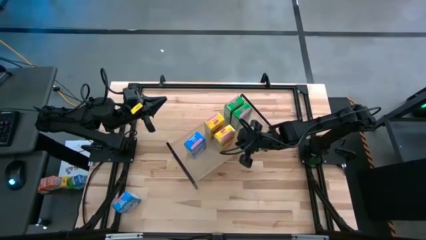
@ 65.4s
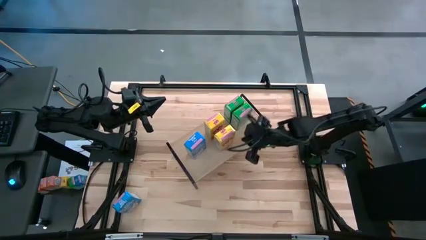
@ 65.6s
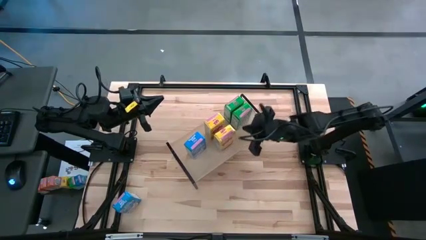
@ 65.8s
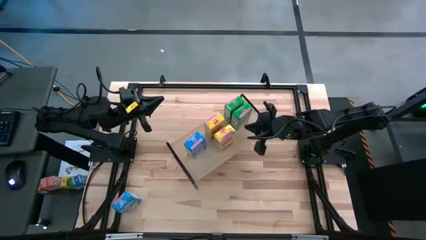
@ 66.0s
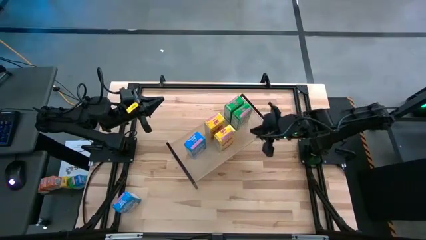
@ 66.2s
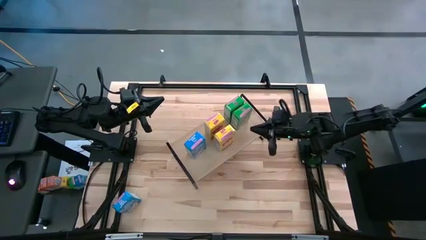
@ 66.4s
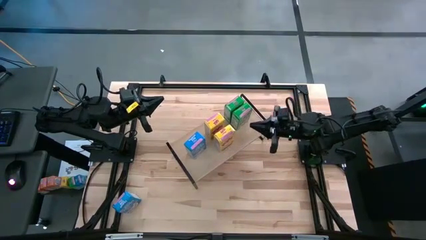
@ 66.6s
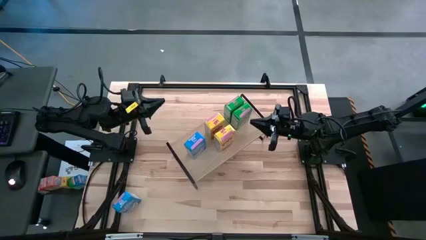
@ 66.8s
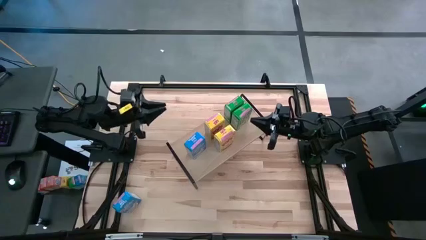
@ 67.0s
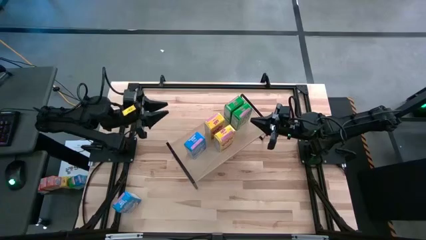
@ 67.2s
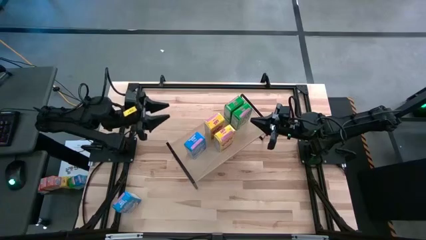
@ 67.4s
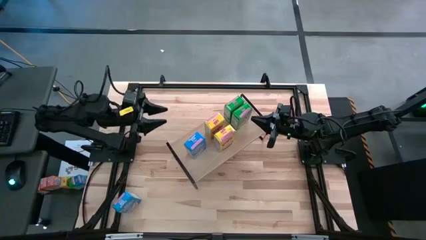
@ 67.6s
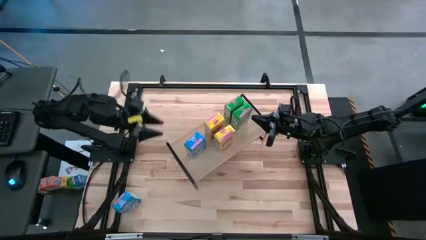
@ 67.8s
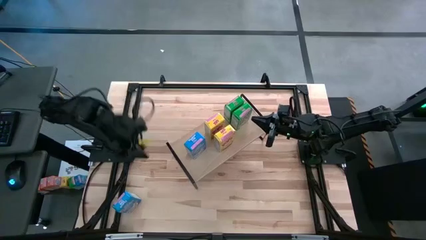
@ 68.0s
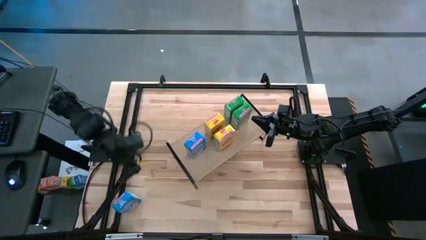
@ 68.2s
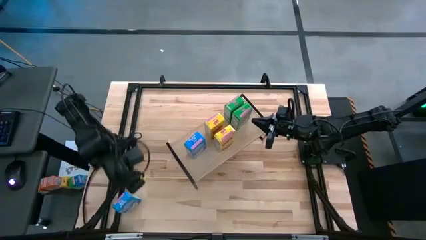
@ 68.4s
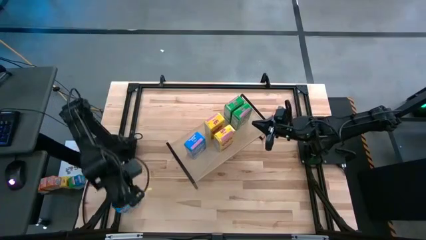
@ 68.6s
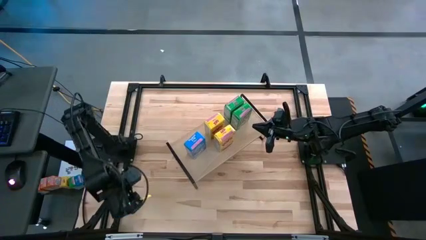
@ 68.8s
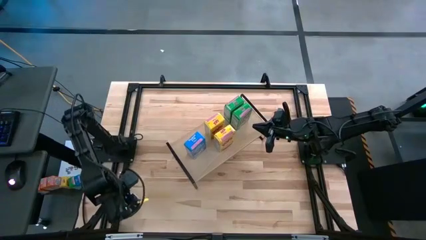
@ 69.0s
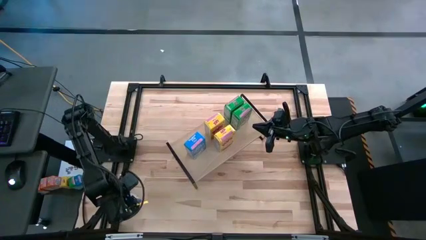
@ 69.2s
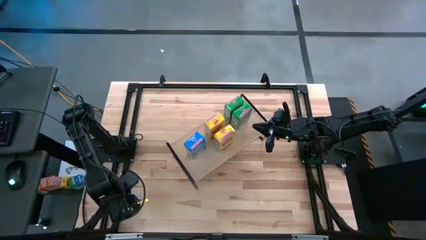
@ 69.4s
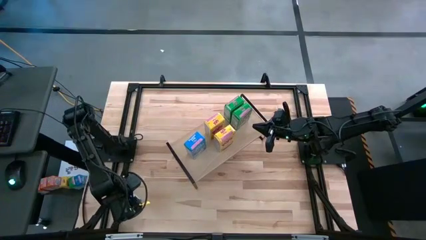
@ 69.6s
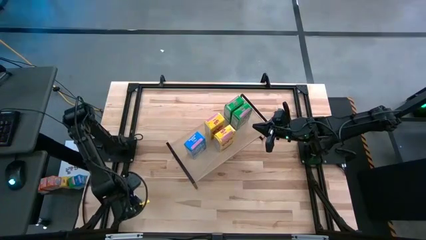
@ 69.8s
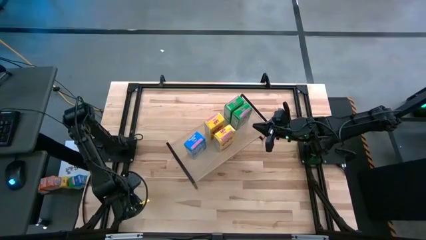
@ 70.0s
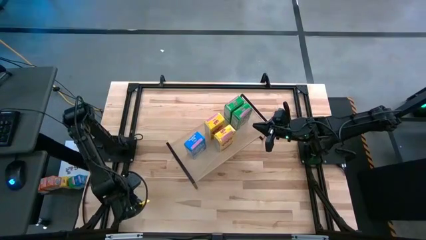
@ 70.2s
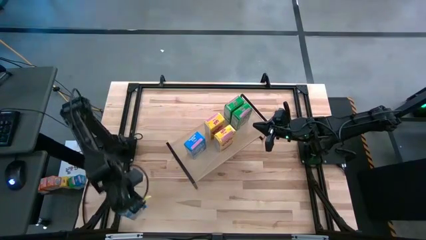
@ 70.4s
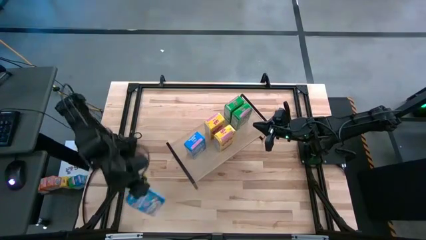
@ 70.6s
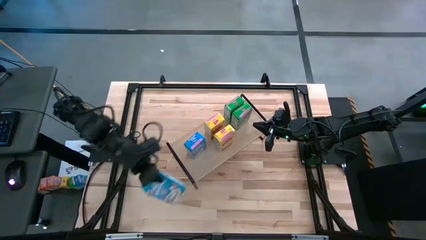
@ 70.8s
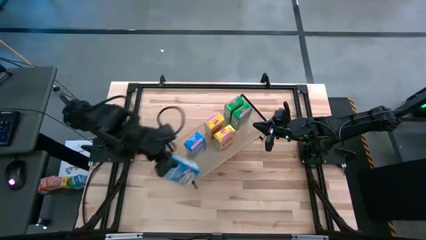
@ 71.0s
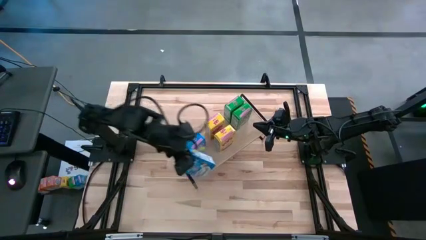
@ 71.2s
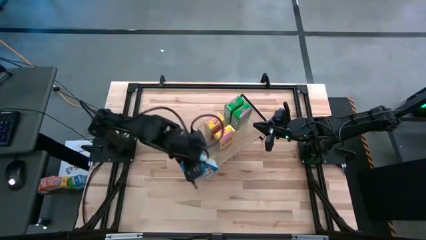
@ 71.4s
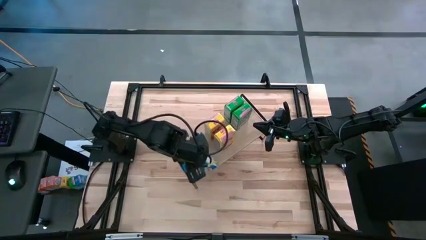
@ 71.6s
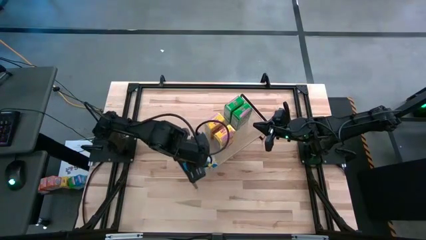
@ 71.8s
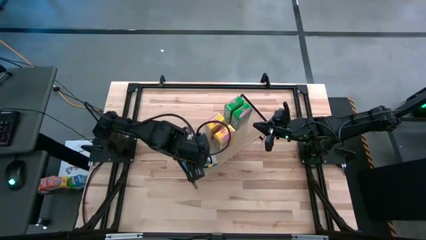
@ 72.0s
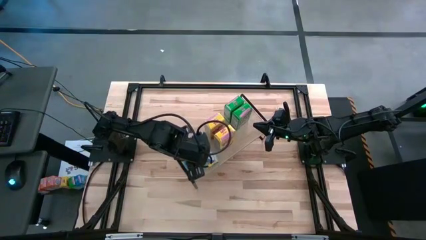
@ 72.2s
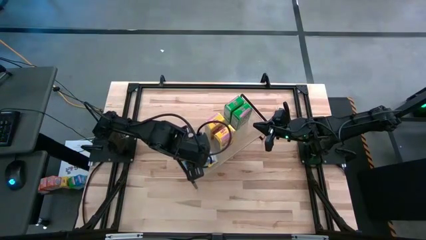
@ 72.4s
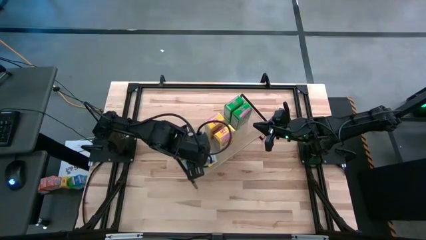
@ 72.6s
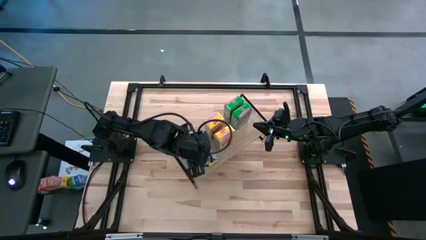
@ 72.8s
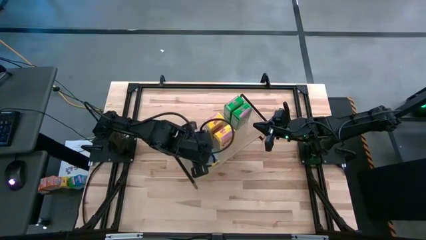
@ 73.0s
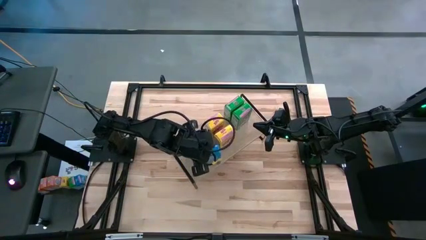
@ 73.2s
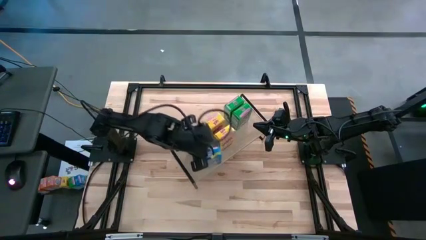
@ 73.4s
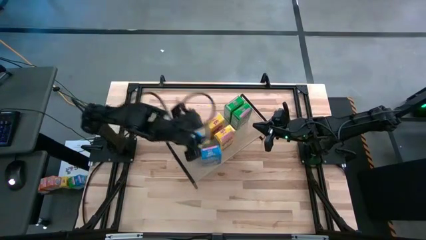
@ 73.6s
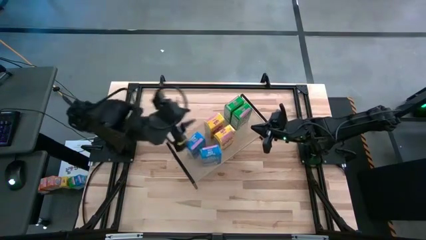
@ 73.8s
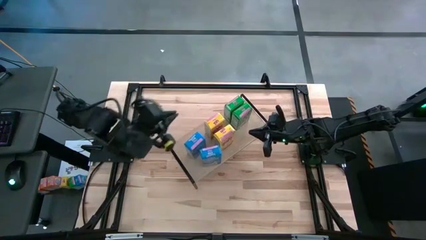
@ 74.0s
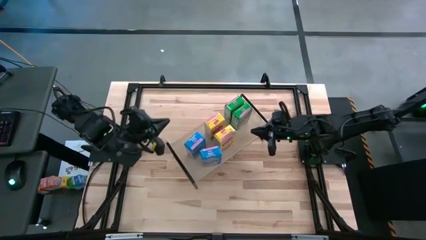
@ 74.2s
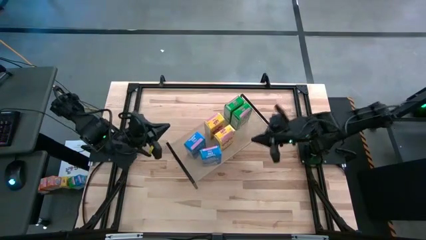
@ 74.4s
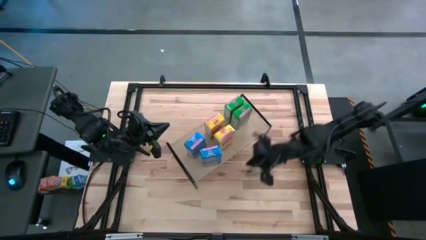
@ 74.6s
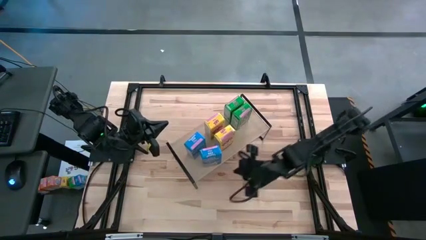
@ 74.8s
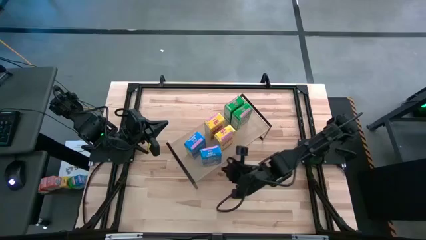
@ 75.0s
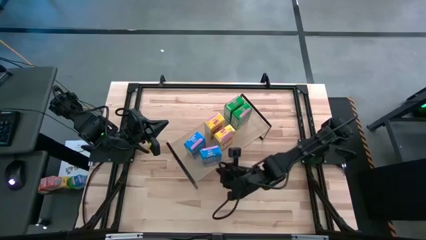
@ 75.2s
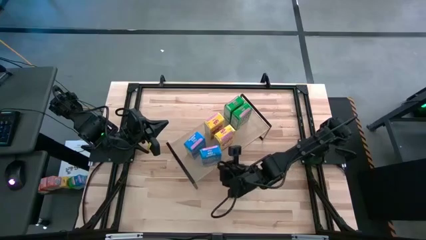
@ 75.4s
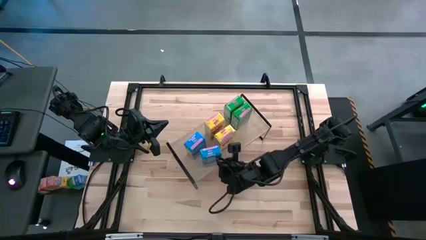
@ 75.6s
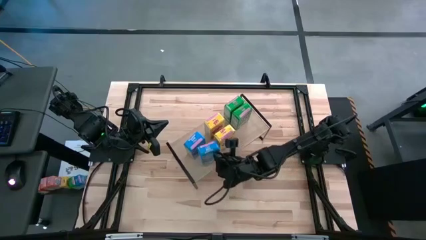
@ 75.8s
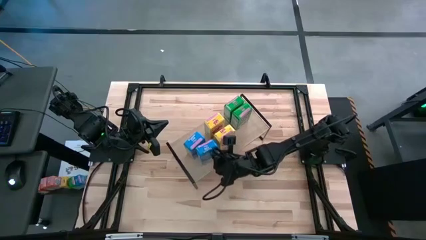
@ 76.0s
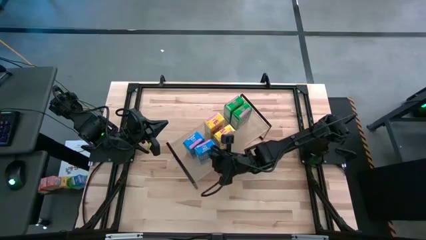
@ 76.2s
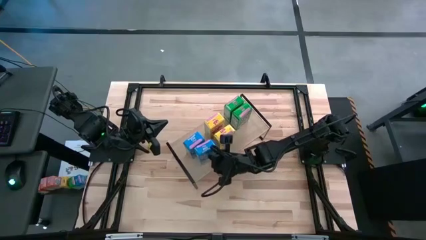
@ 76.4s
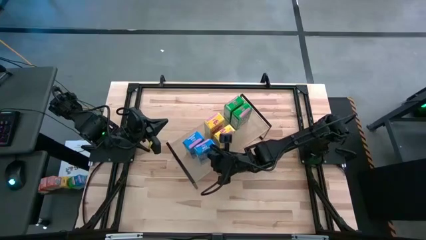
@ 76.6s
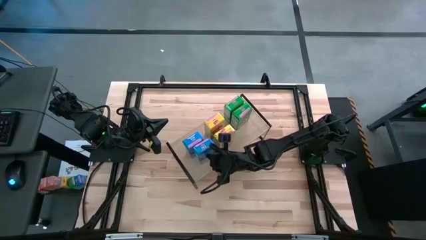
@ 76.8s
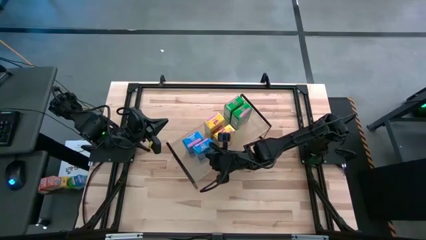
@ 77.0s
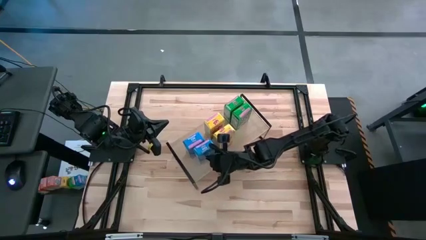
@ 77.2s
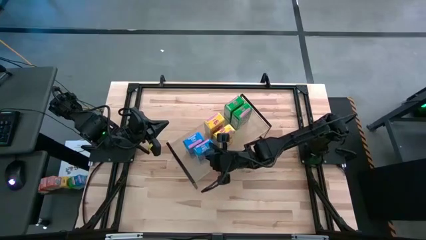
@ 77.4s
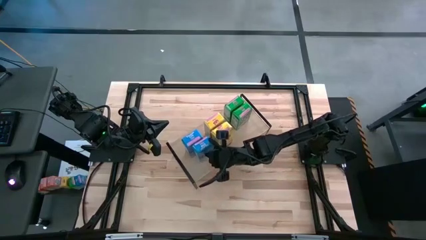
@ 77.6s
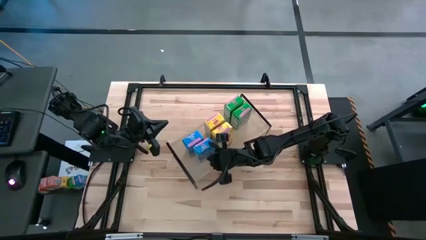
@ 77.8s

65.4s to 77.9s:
Task: Stack cereal on shelf
Put the blue cereal box on the shelf align with the other blue cereal box

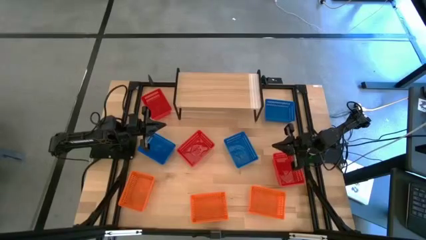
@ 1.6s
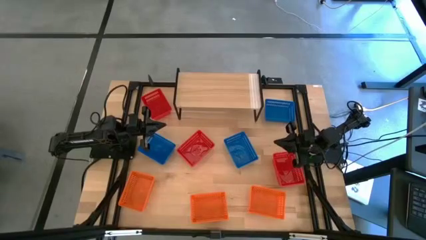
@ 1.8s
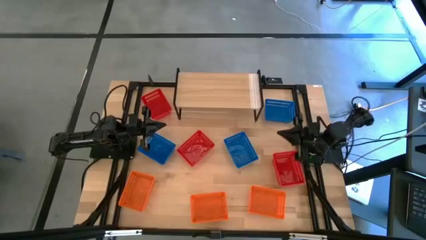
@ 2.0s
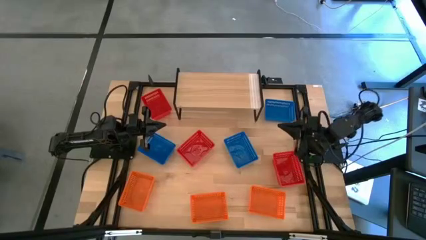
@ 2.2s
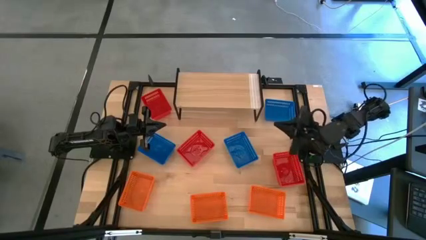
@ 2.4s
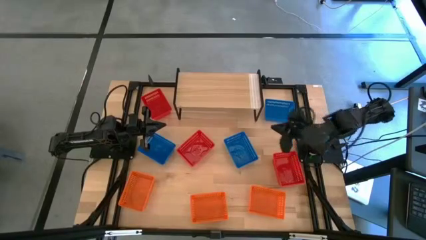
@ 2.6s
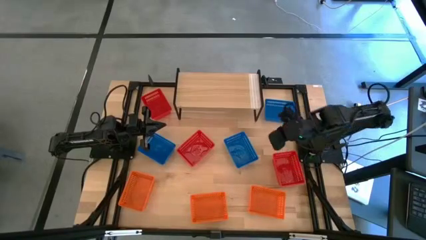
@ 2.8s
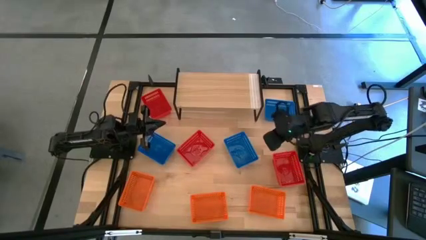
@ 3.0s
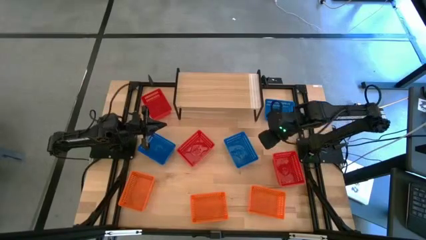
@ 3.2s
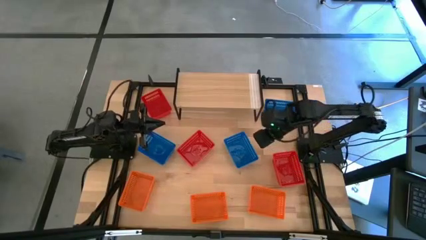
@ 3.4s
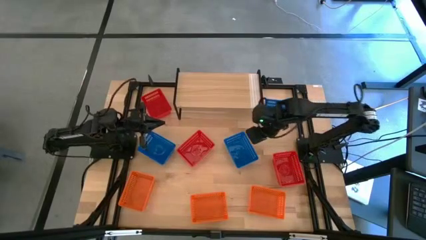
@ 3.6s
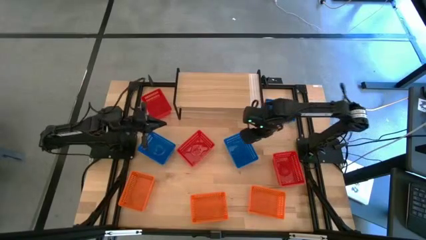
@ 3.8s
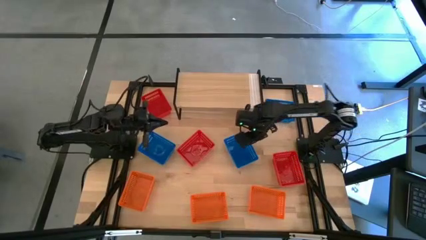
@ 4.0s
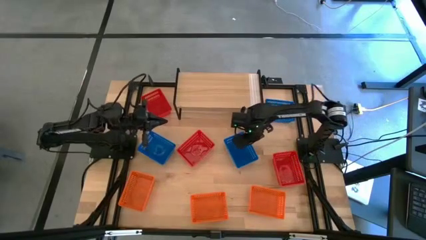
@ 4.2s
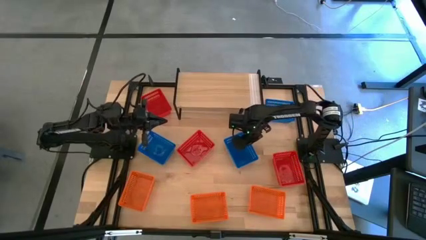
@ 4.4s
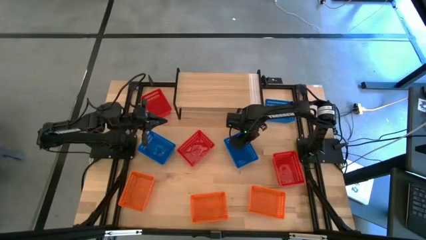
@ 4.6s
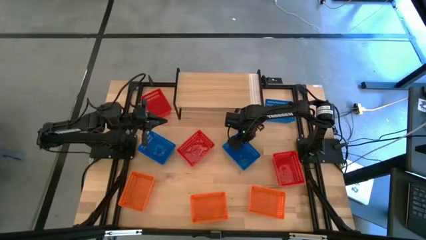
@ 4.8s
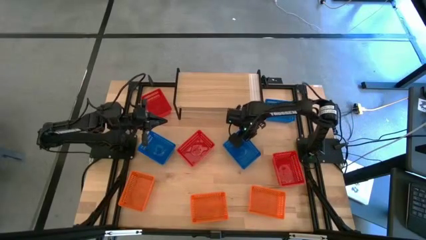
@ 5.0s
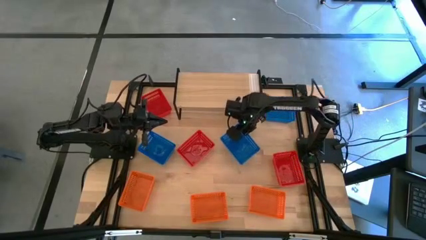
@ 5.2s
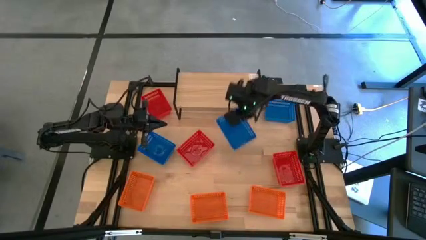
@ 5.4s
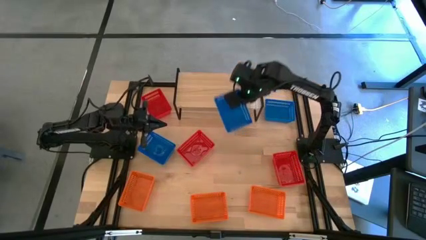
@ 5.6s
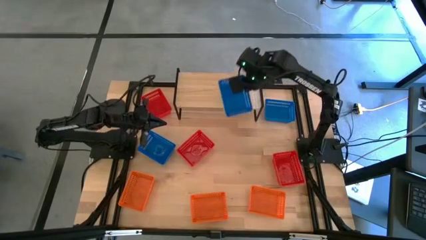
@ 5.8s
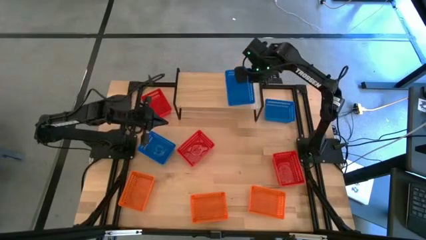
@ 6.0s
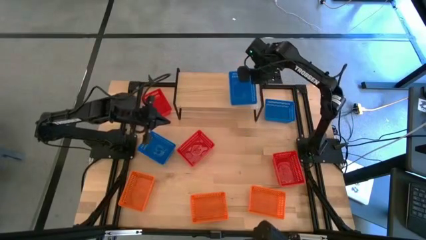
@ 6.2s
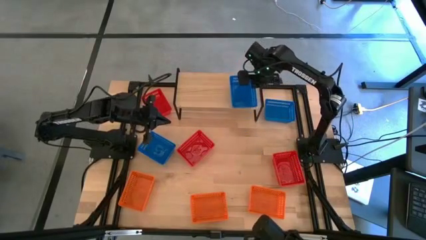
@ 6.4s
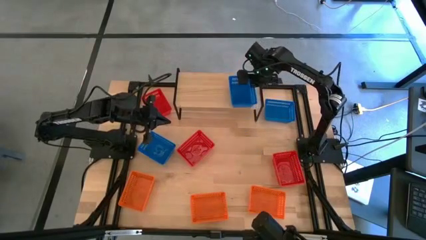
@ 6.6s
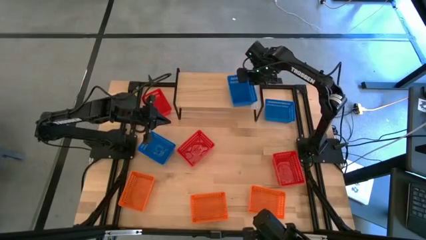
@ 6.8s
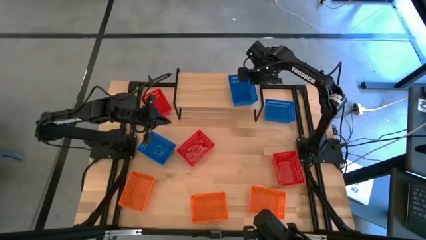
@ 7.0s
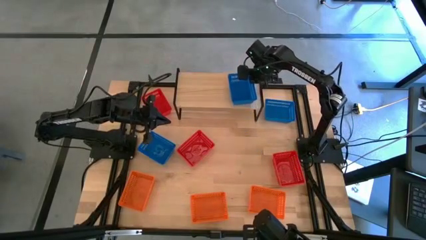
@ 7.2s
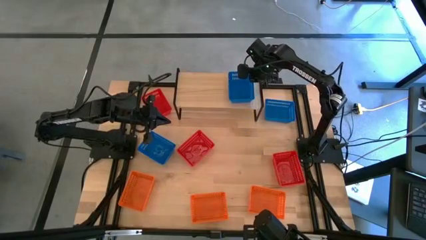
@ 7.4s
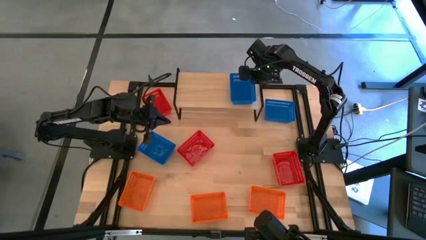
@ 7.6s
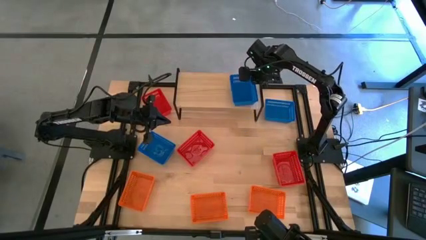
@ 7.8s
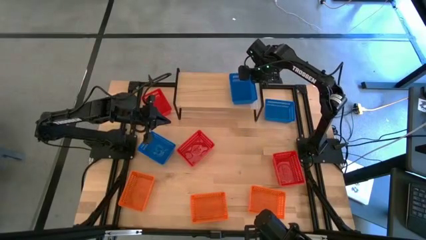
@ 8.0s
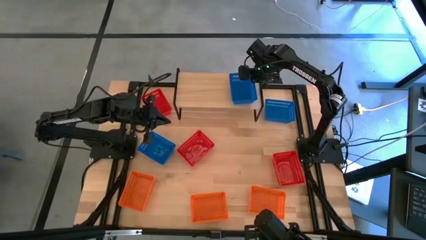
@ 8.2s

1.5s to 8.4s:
Task: Stack baskets on shelf by color
Put the middle blue basket on the shelf
